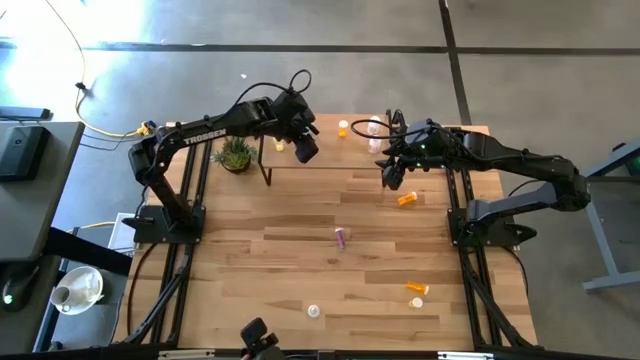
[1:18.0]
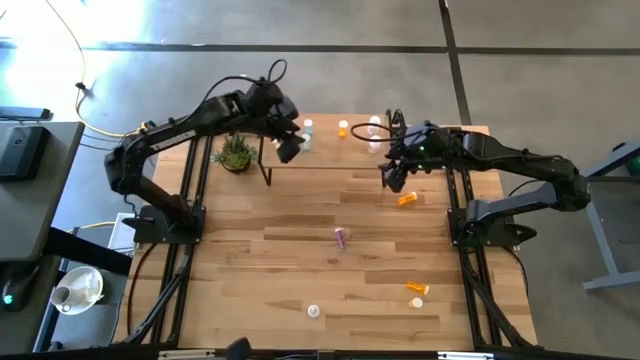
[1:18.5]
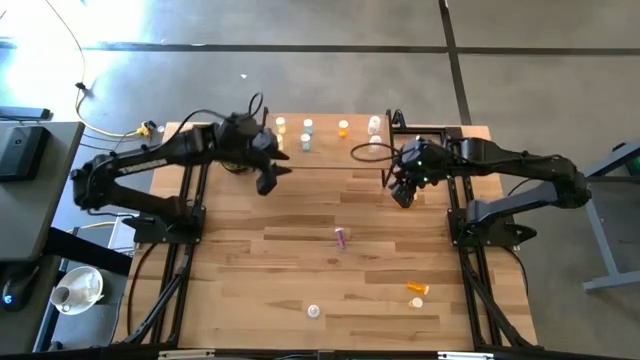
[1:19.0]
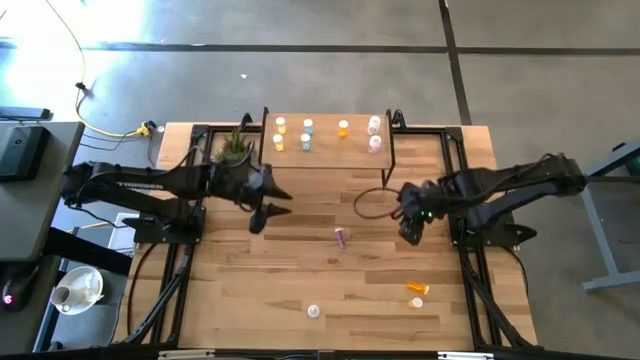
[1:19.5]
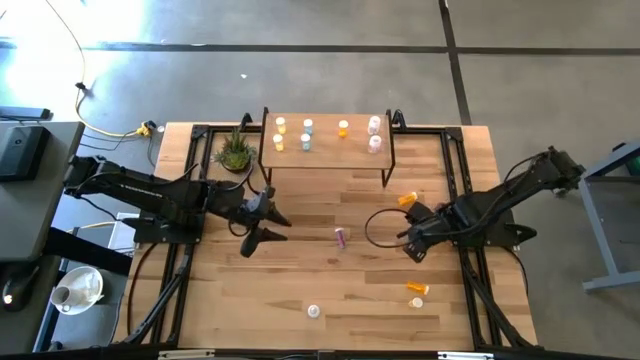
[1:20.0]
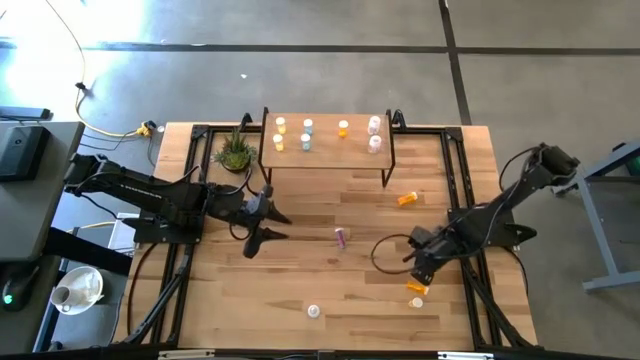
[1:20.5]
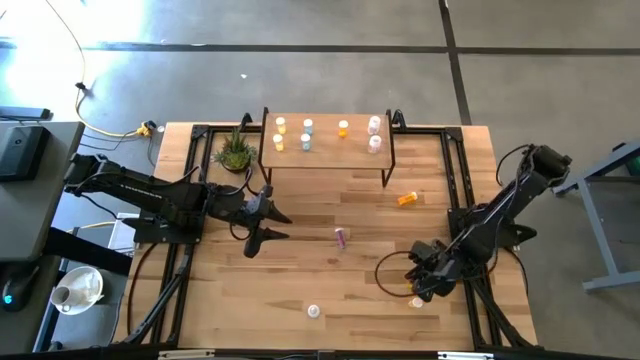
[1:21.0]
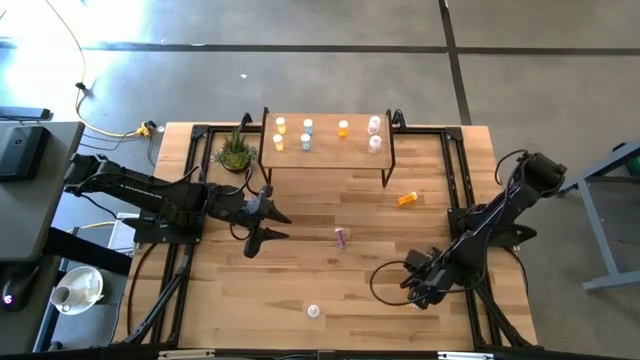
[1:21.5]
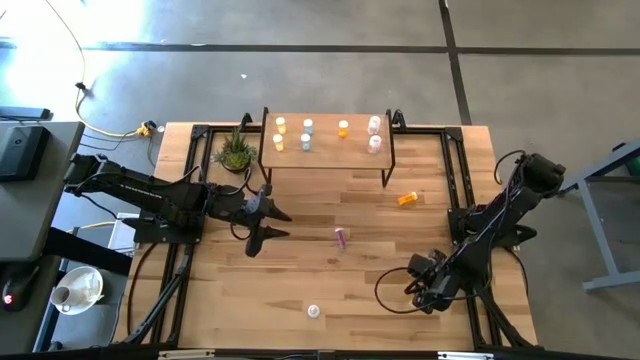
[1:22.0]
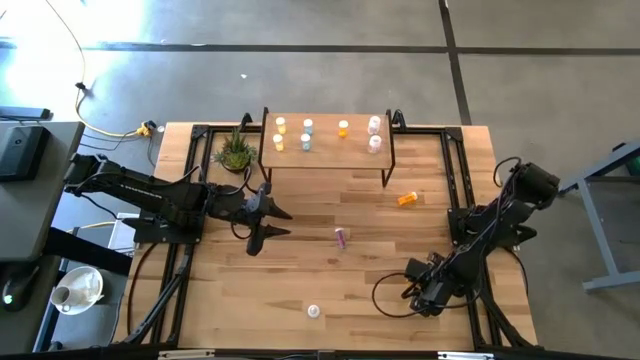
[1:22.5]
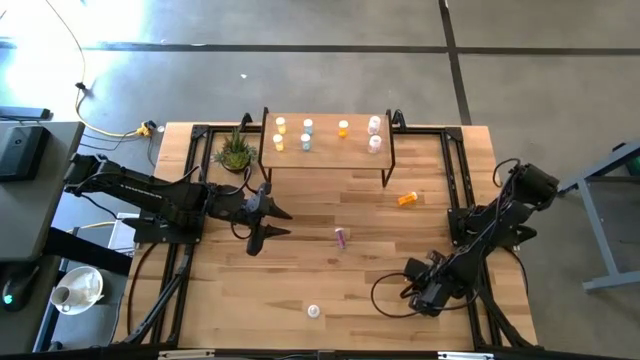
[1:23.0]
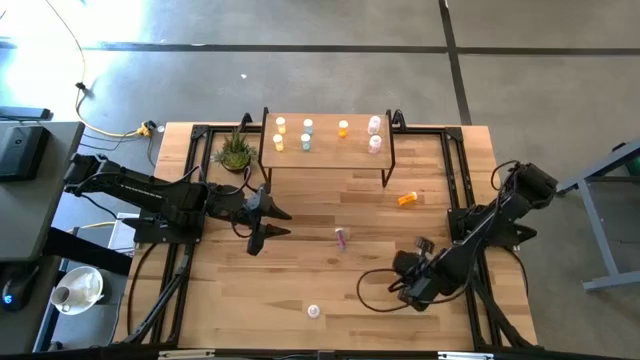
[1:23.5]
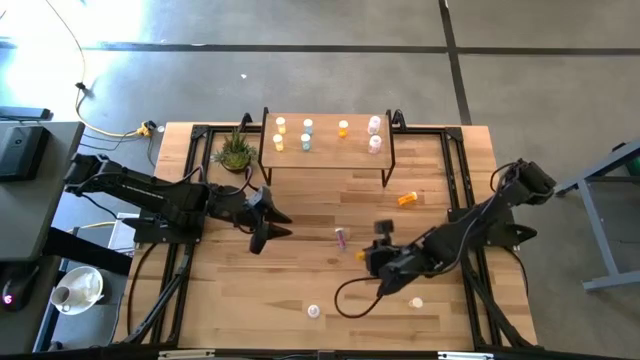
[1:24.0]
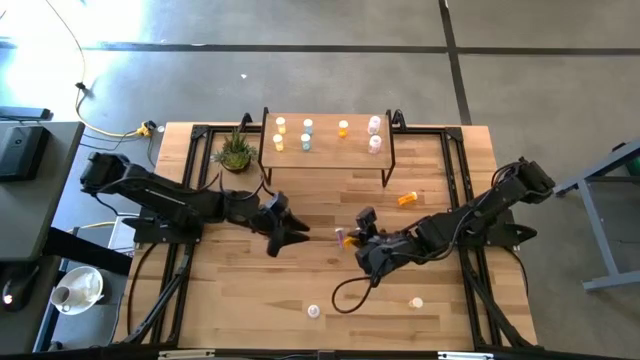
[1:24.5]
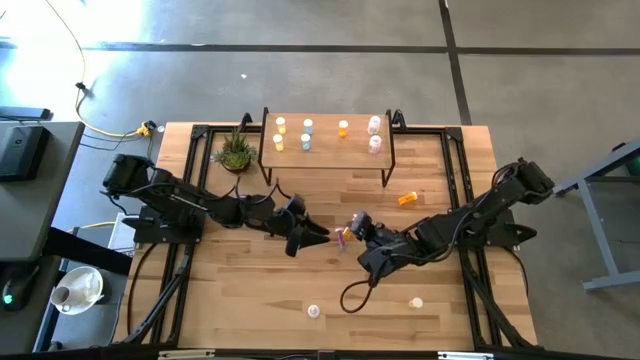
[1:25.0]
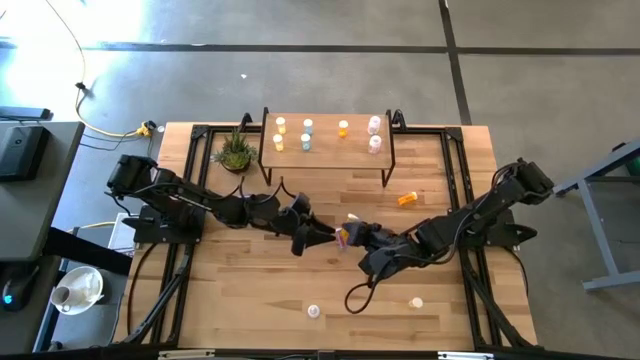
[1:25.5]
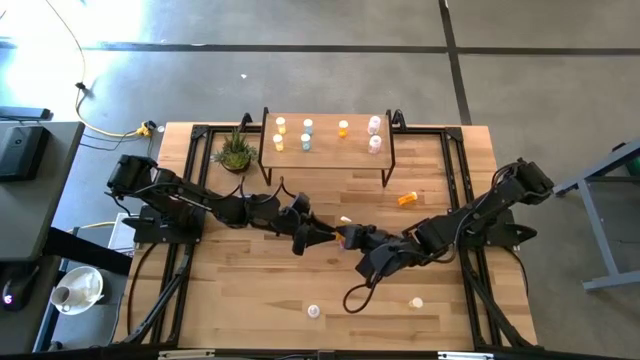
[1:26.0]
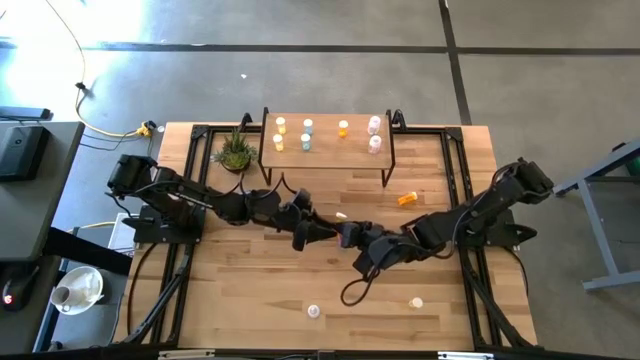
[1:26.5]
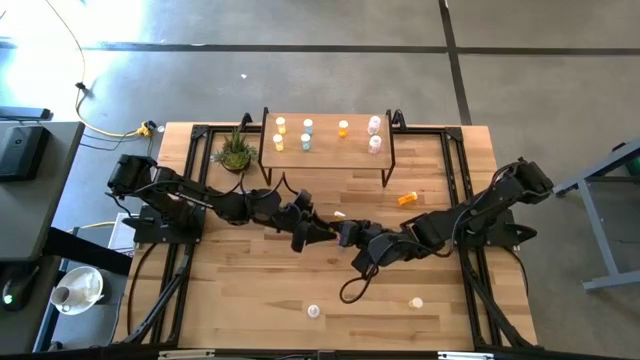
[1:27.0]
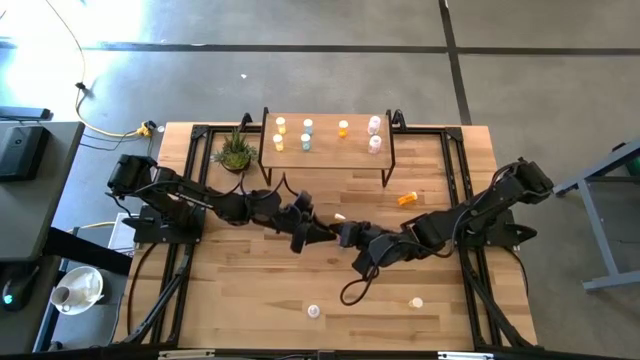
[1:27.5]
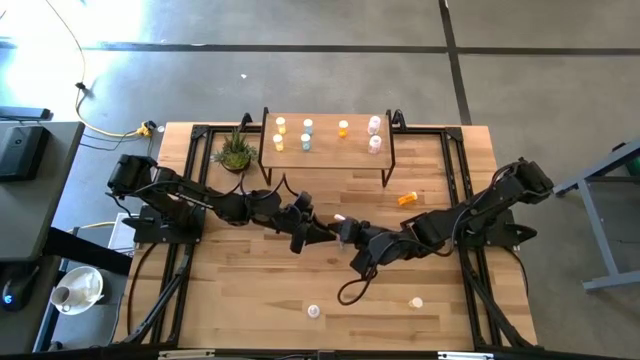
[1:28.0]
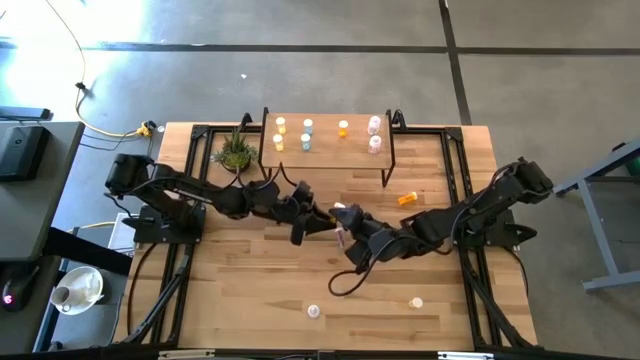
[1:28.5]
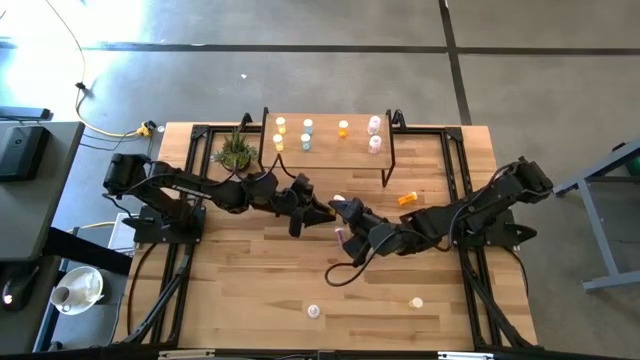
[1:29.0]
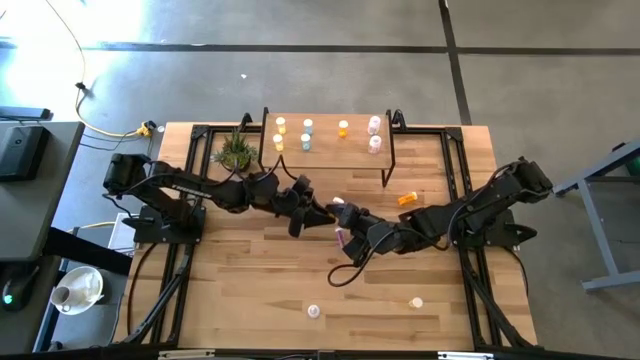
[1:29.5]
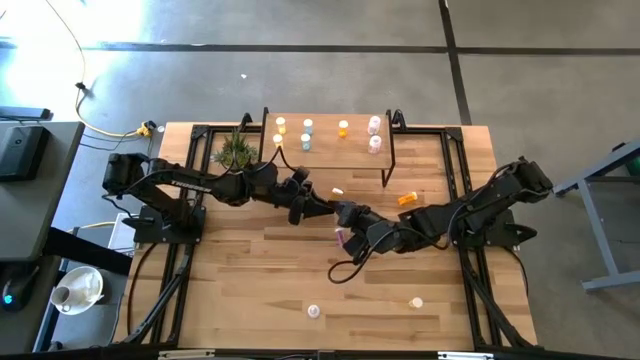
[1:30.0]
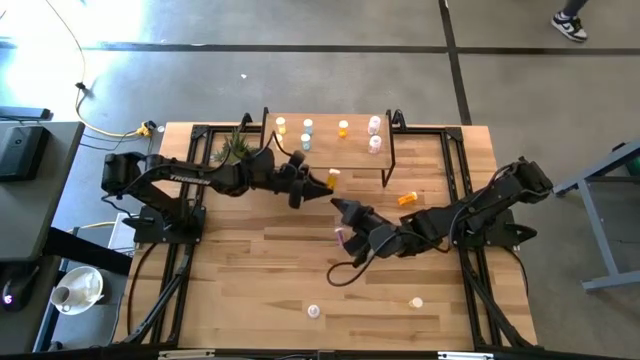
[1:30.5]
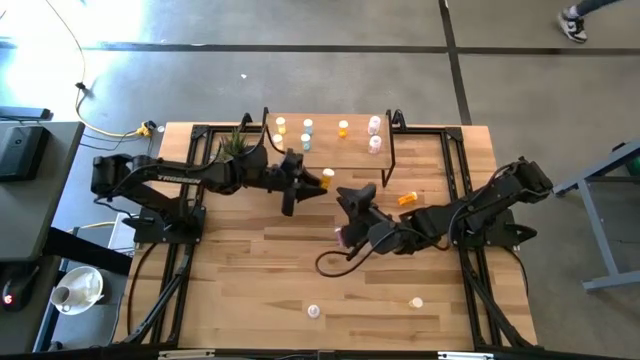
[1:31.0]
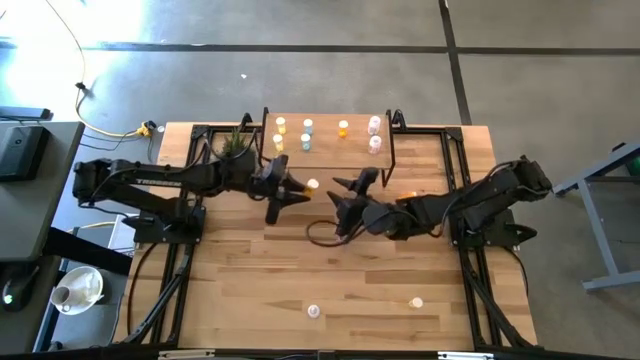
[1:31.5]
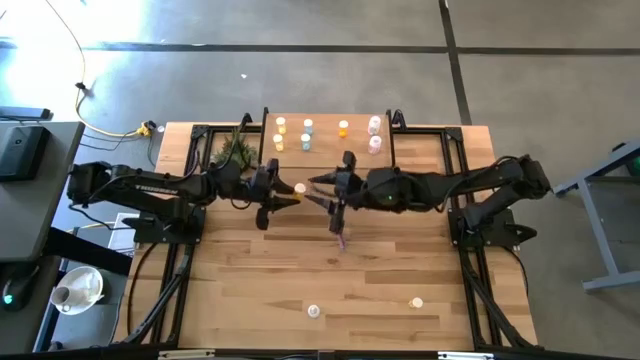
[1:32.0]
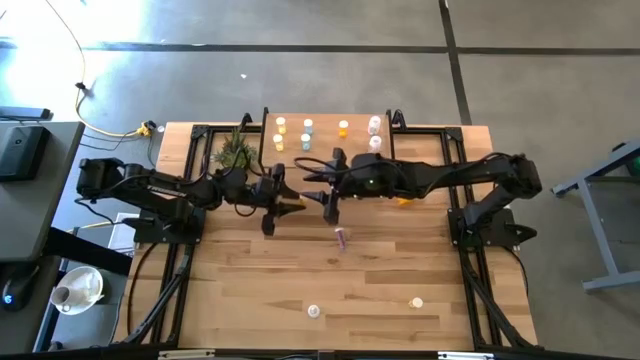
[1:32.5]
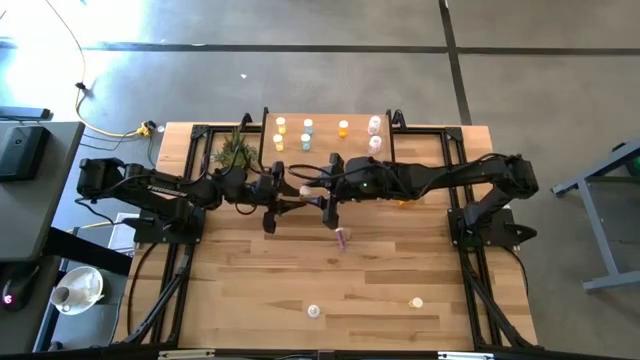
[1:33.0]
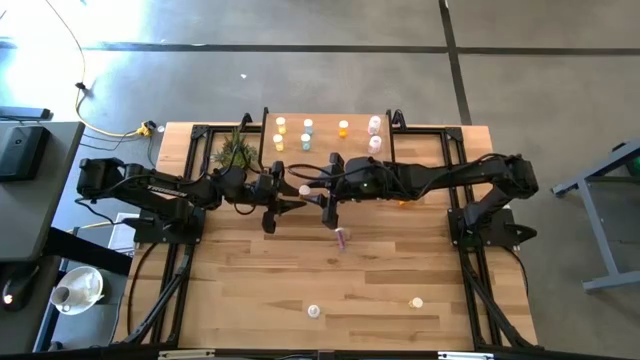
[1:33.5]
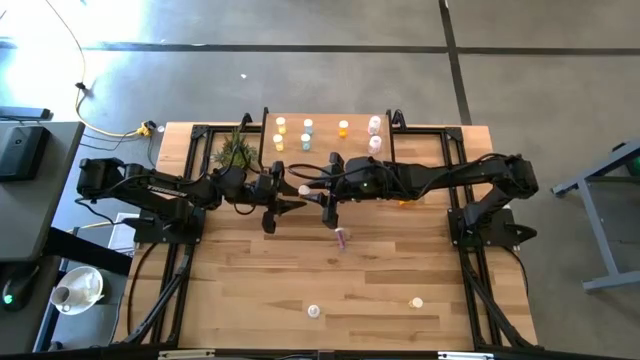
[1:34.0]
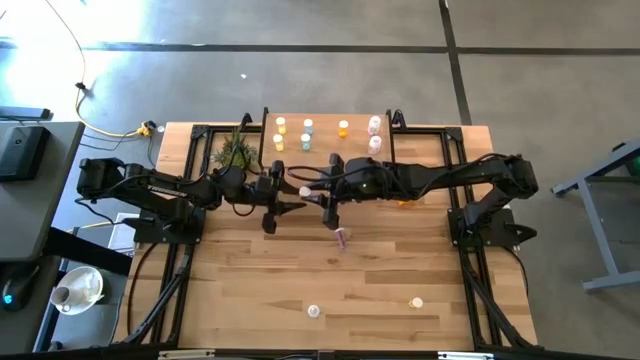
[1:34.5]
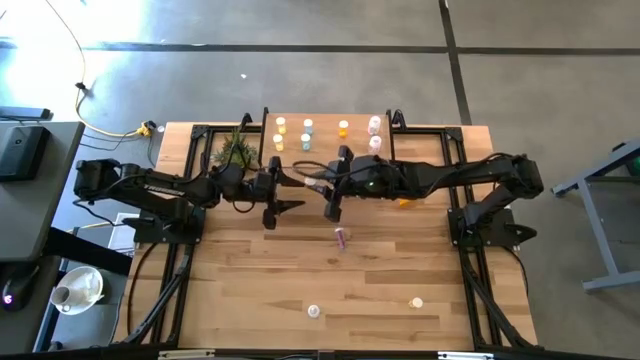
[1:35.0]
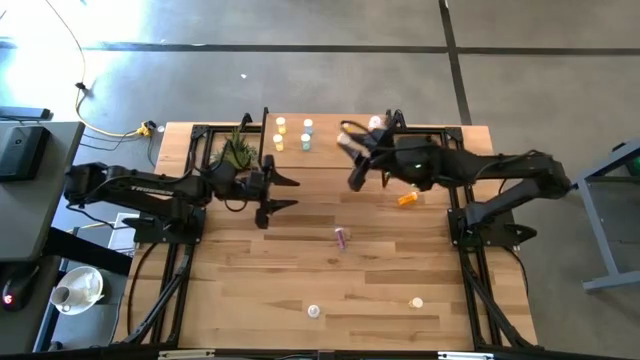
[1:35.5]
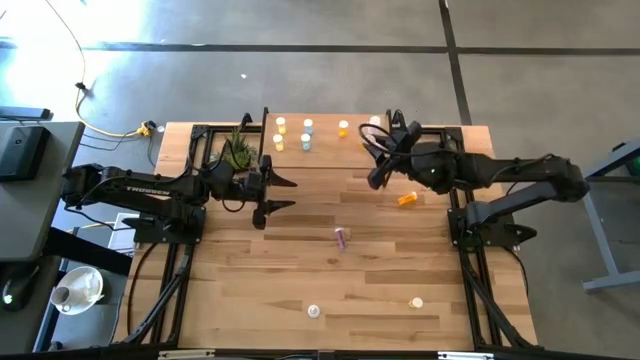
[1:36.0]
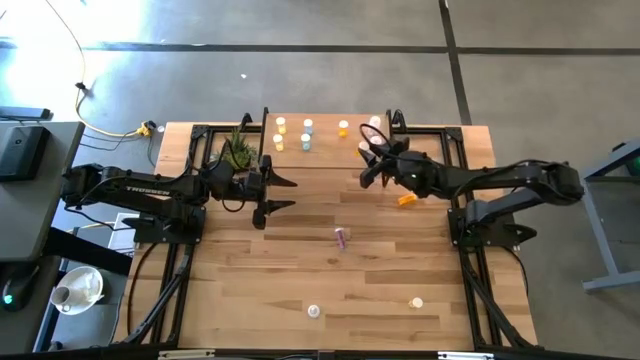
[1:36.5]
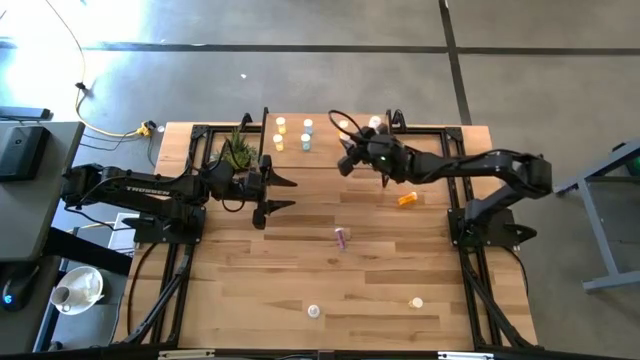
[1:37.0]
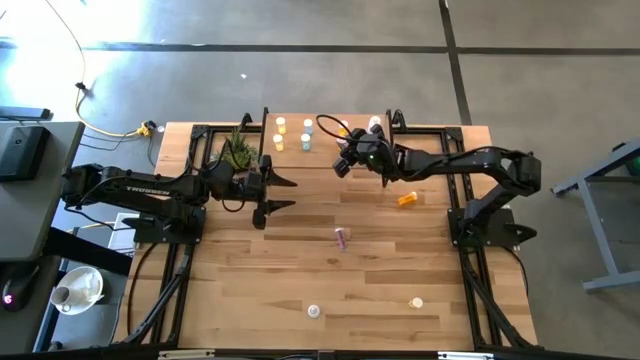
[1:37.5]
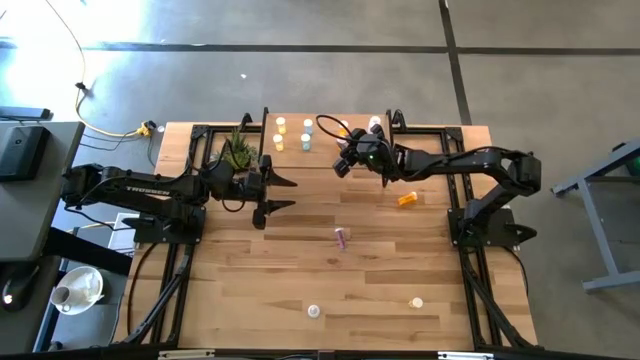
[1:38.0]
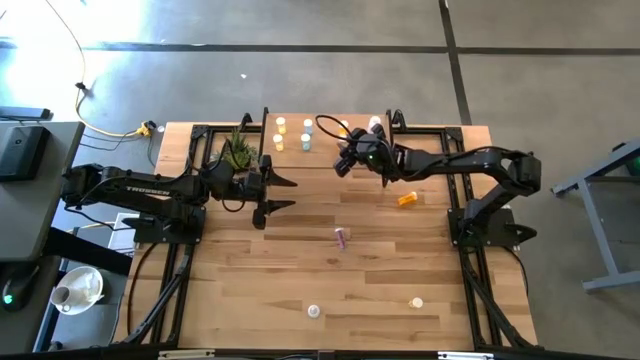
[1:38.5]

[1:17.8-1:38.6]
Task: Pick and place medicine bottles onto shelf by color
Put the bottom orange bottle on the shelf aligned with the other orange pill bottle
